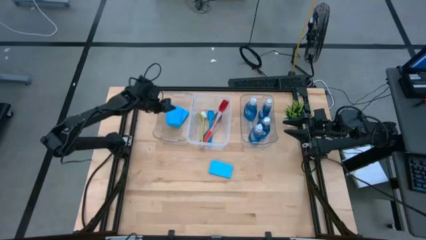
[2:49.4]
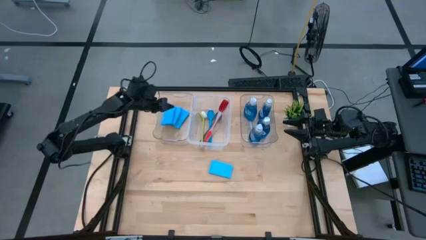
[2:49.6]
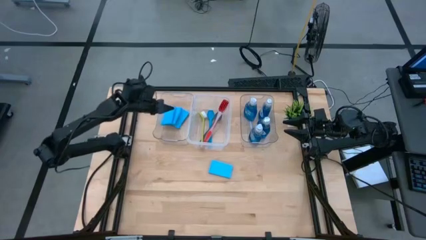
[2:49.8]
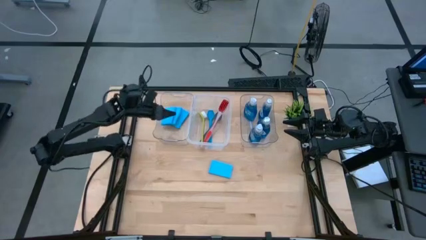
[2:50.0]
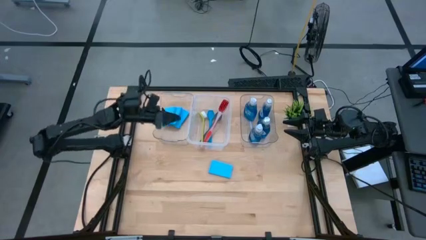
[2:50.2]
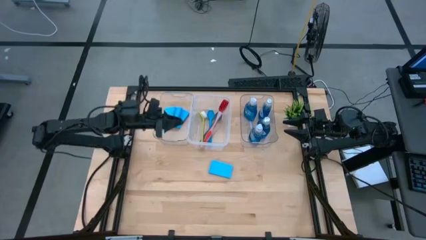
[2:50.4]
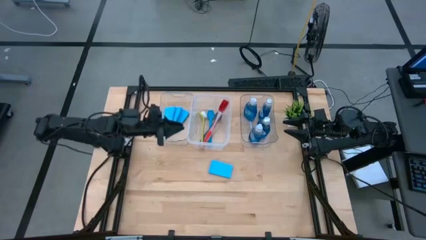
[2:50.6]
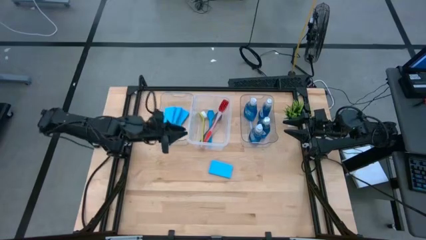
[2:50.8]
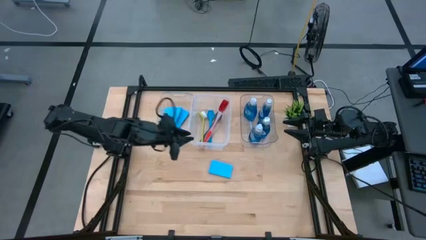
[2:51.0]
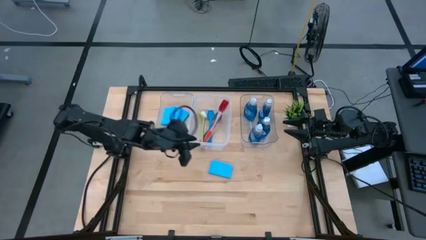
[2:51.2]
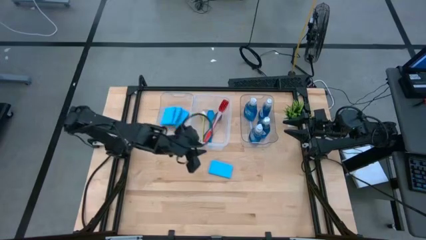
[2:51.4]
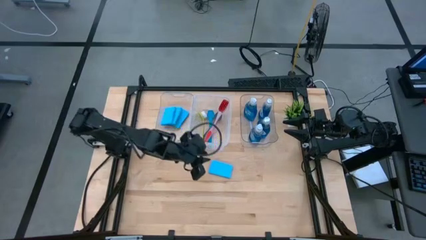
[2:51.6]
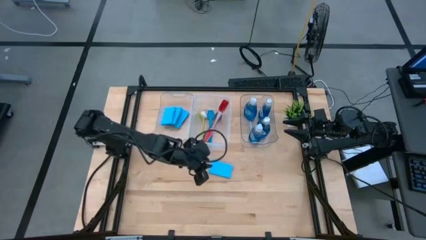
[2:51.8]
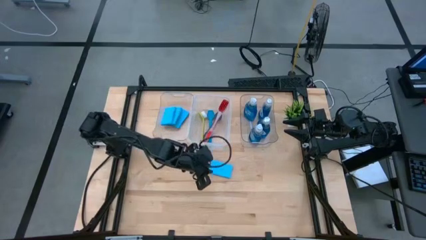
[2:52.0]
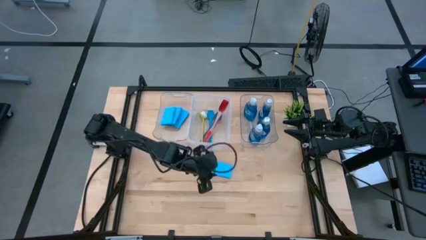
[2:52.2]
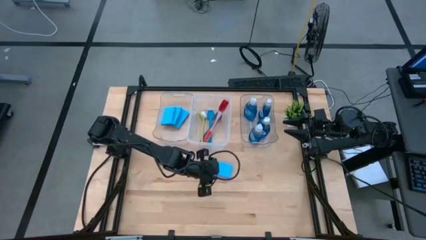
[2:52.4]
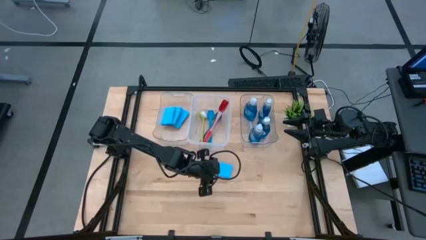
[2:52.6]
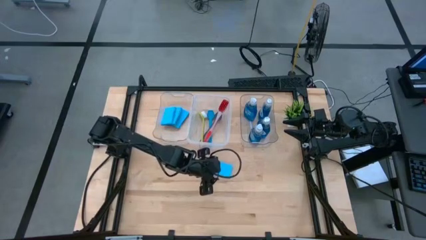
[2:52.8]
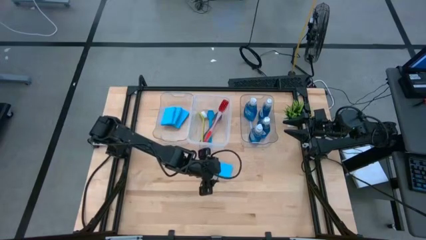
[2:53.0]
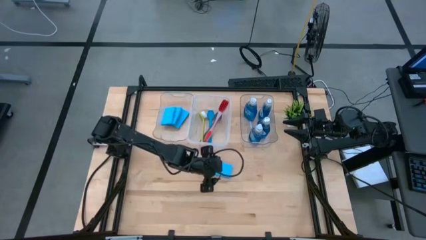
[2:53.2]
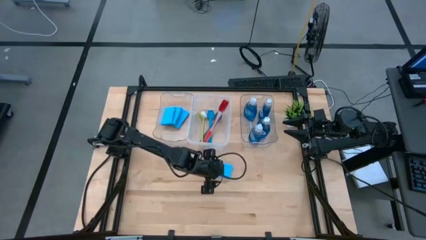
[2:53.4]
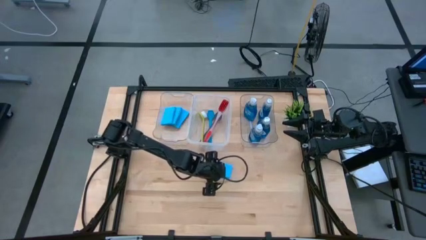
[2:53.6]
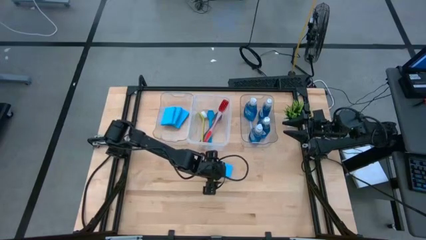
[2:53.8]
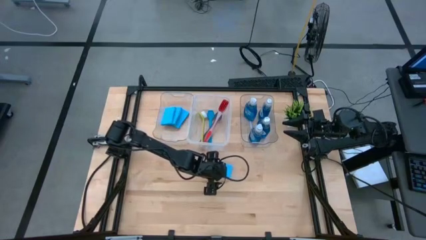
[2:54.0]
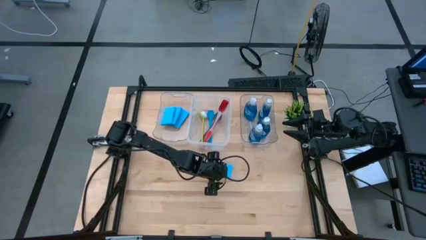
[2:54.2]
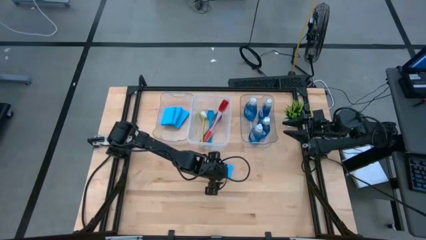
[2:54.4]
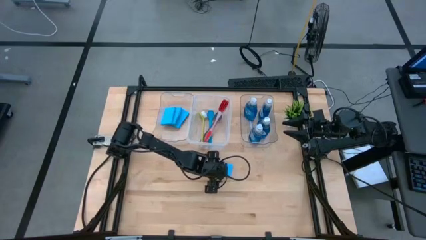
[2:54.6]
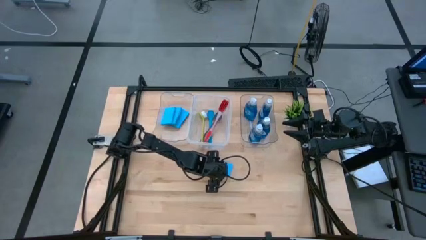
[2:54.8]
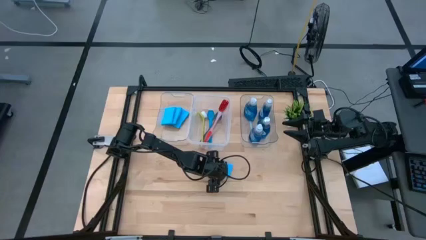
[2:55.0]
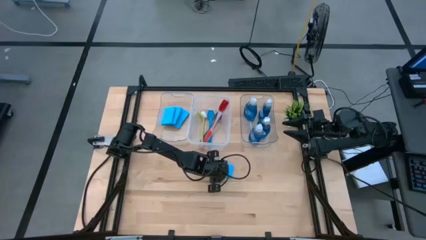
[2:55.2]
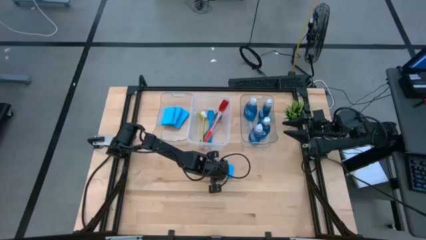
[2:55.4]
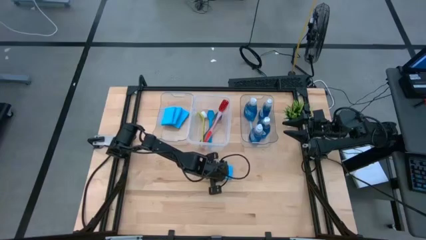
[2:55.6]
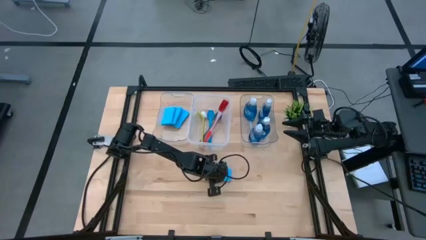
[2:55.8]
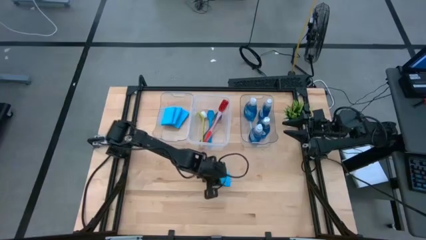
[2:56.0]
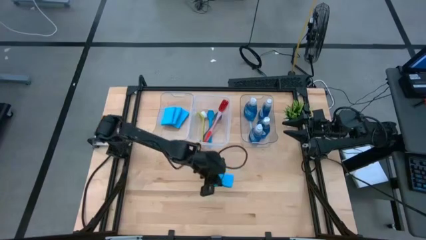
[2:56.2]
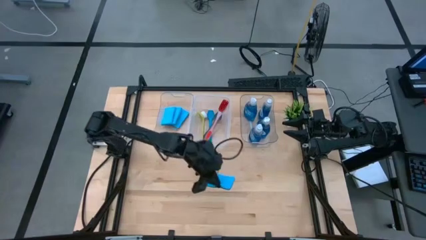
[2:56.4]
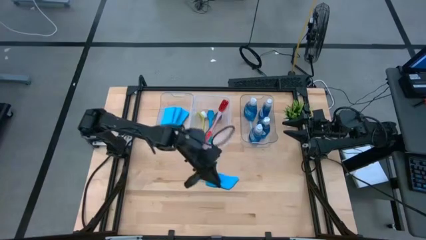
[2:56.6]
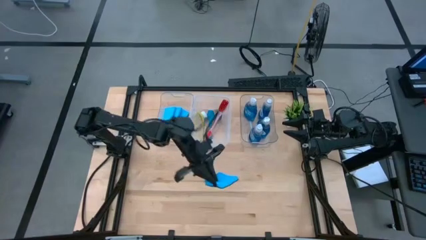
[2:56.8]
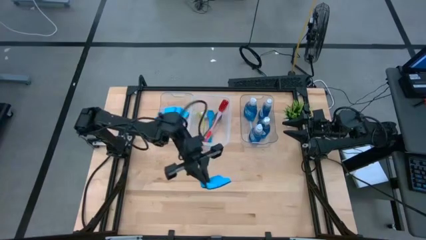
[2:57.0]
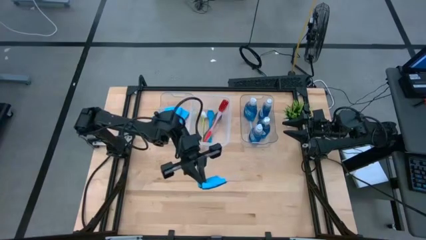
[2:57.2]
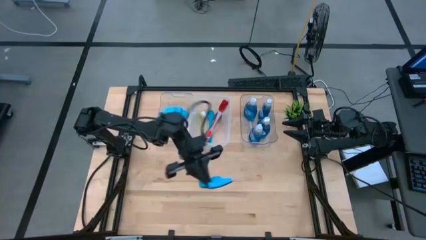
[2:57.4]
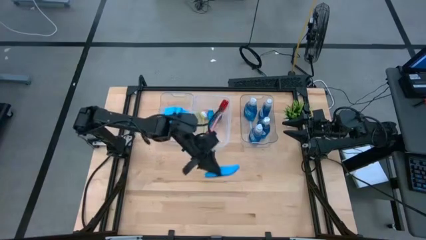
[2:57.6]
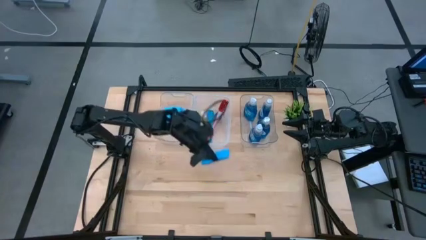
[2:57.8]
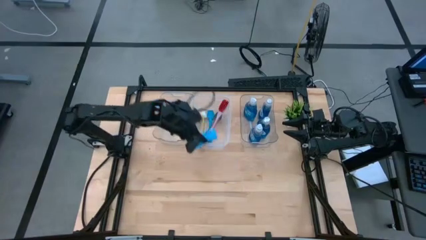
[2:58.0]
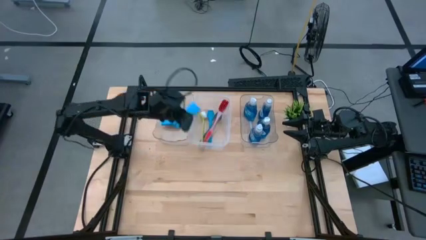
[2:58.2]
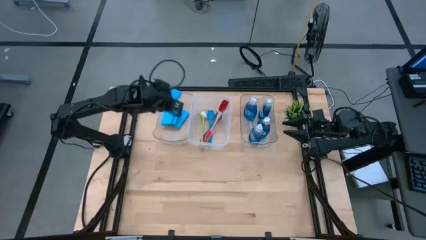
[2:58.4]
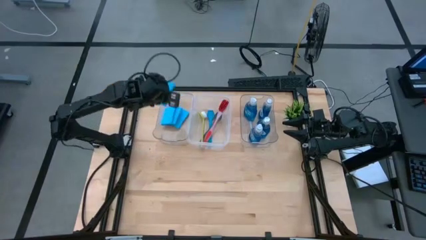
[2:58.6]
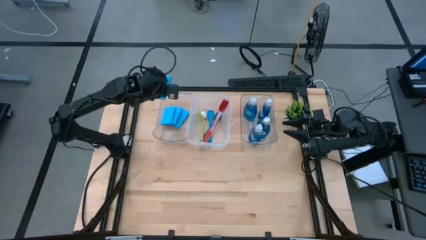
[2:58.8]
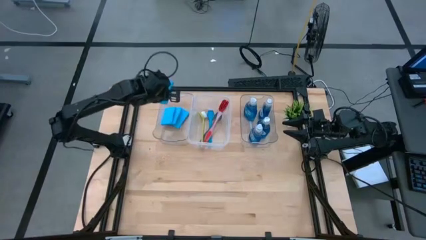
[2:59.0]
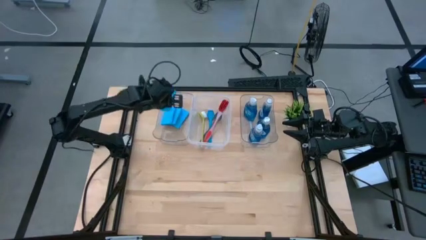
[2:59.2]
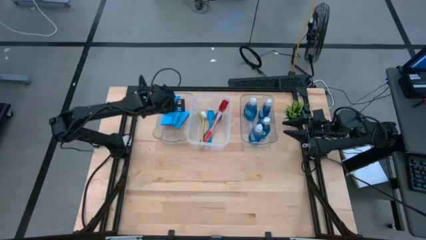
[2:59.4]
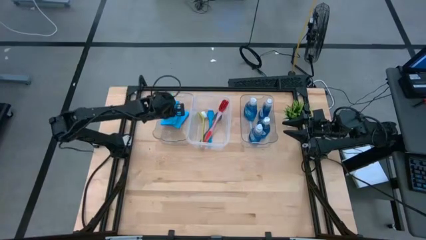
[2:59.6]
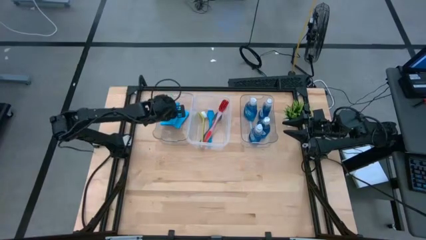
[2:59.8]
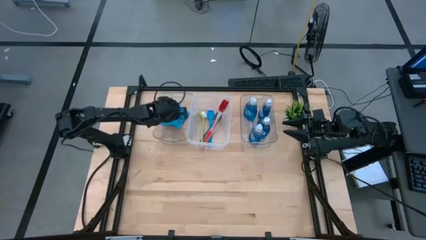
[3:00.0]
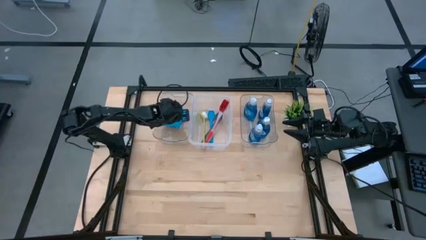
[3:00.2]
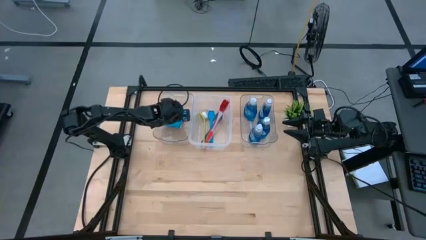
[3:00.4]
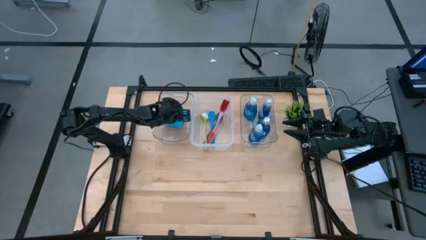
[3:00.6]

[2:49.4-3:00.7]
Task: Pick & Place Kitchen Sink Supplies
Put the sponge into the left transparent bin
